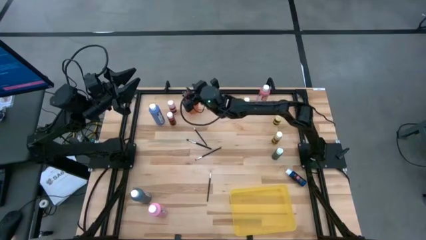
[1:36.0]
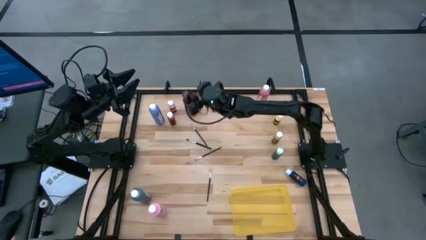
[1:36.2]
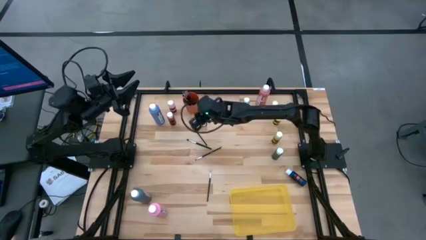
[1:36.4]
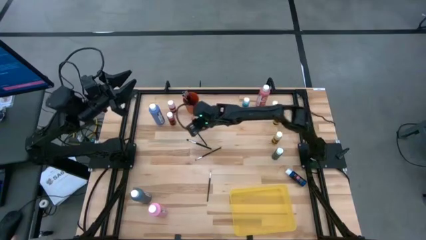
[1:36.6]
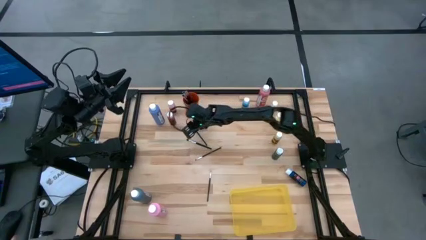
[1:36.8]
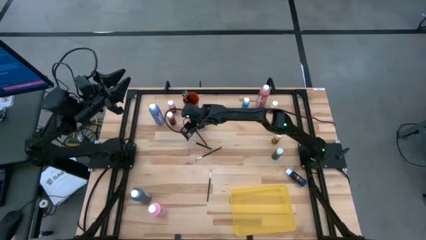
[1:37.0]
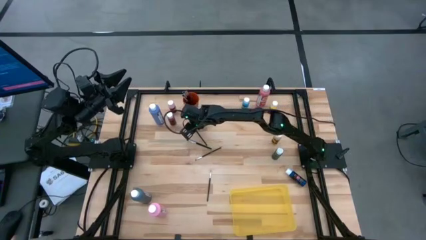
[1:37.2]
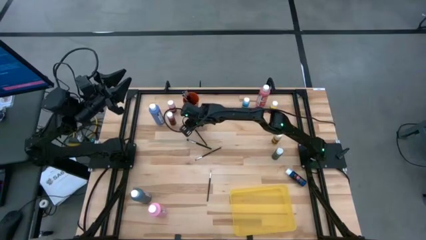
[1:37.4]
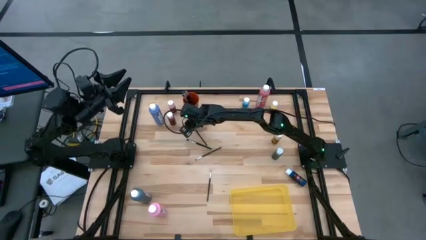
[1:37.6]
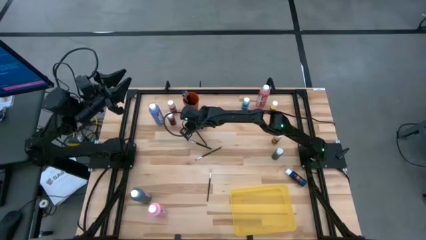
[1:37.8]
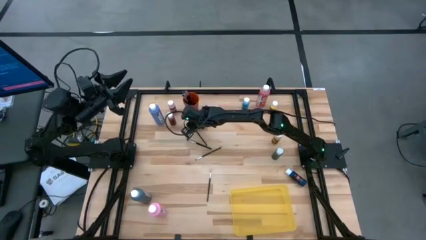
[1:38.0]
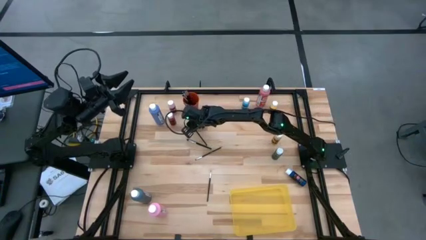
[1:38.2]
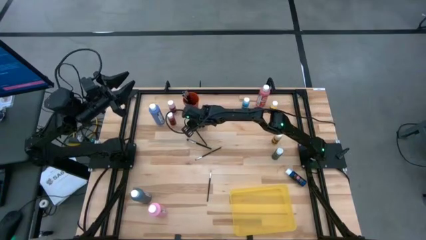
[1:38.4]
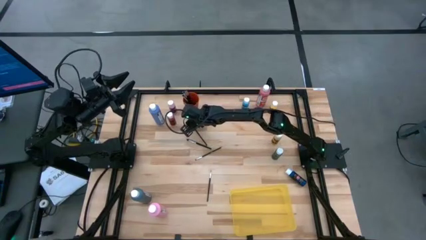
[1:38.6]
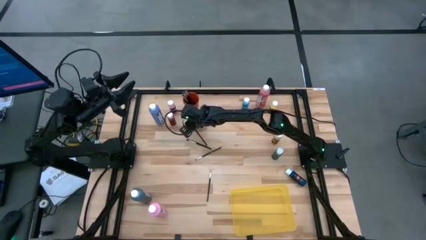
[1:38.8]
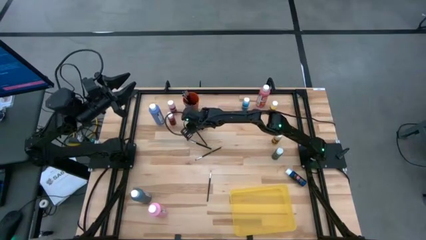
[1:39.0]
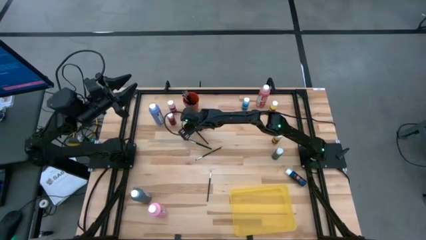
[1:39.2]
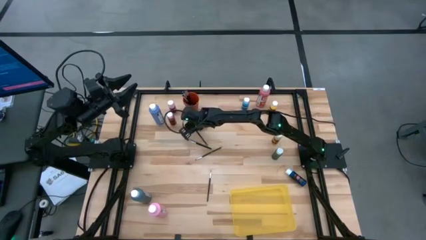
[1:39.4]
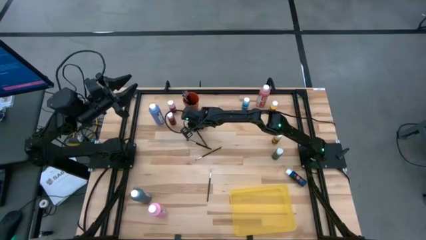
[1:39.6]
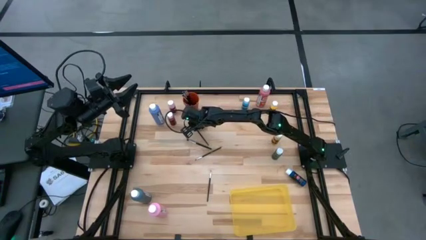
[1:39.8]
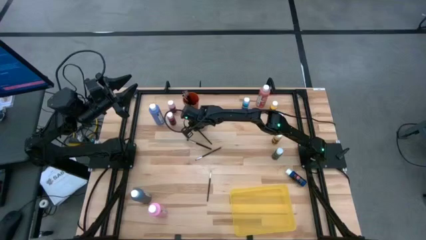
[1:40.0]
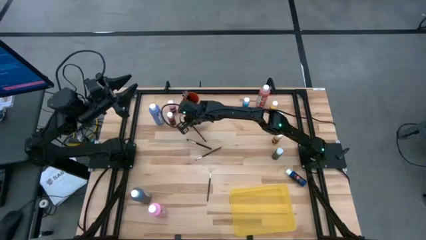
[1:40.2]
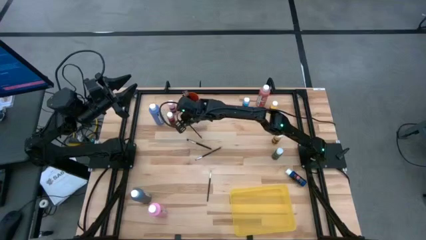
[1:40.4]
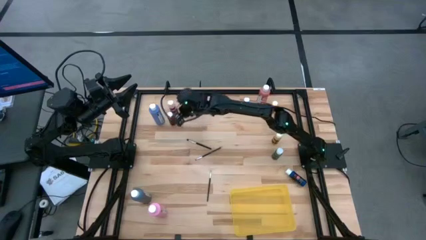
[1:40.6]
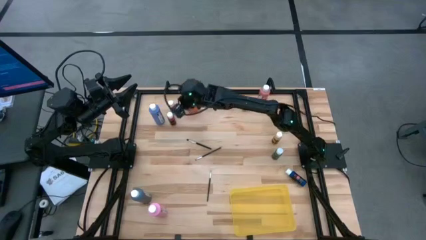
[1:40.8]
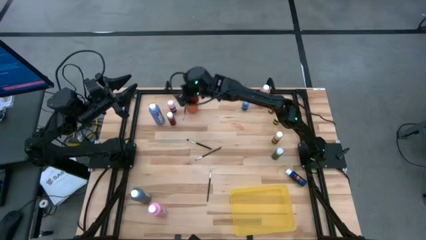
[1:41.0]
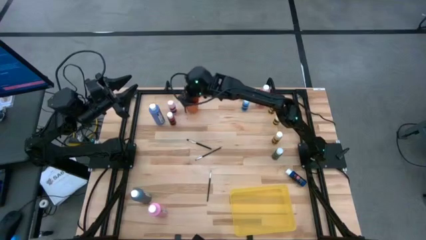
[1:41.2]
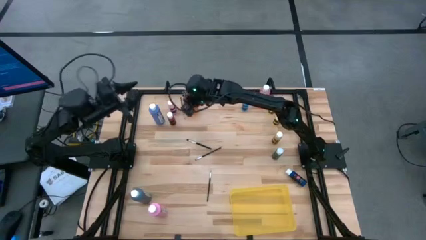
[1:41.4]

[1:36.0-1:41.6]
Task: Pick & Place Paint Supplies
Put the black paint brush into the orange cup

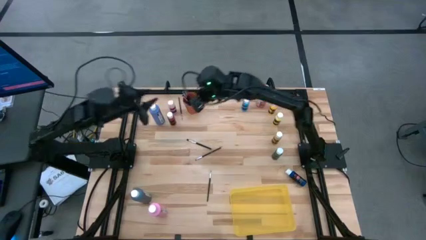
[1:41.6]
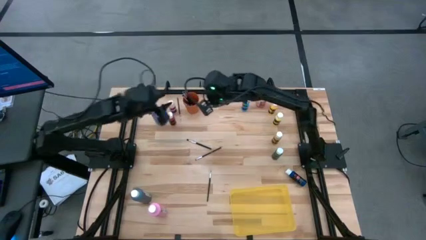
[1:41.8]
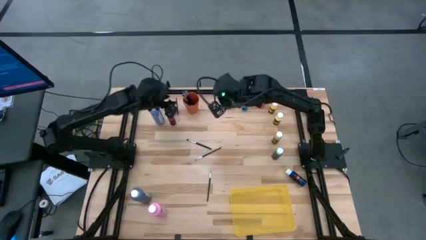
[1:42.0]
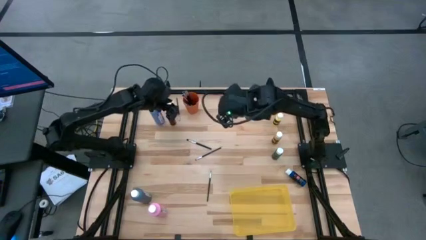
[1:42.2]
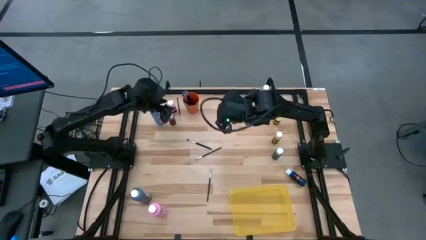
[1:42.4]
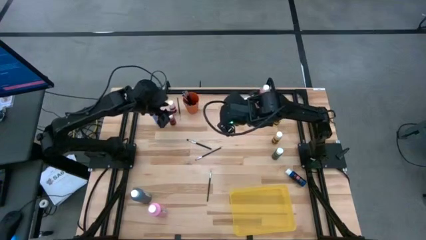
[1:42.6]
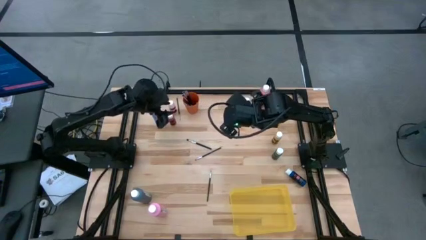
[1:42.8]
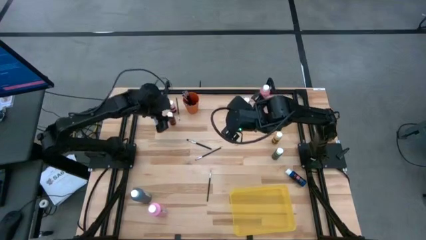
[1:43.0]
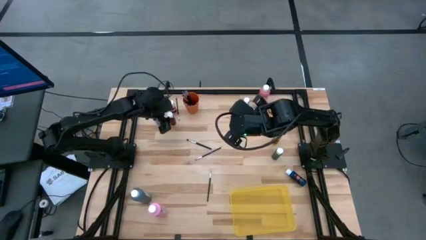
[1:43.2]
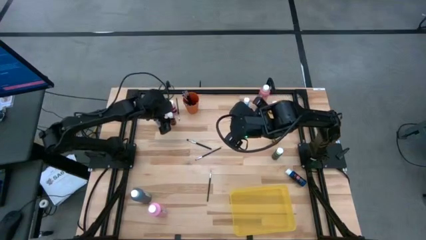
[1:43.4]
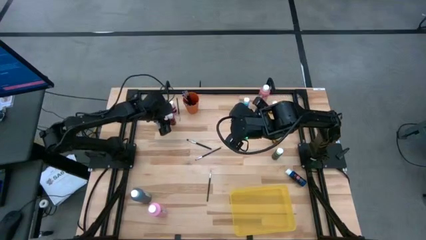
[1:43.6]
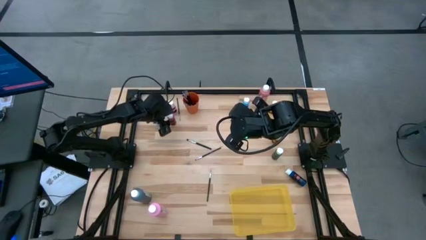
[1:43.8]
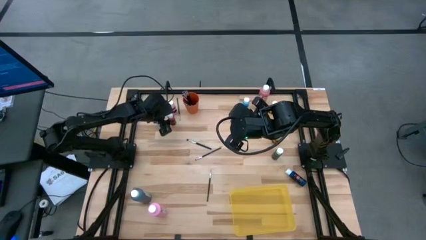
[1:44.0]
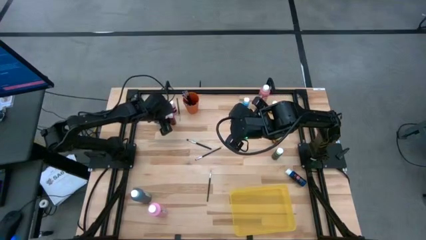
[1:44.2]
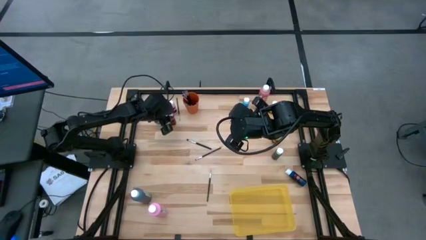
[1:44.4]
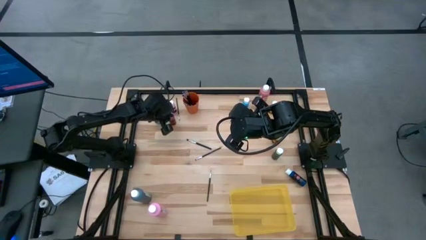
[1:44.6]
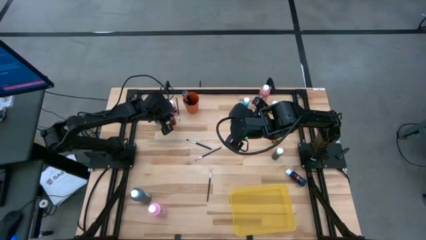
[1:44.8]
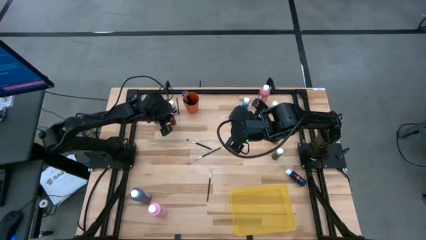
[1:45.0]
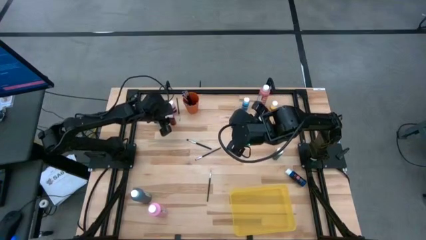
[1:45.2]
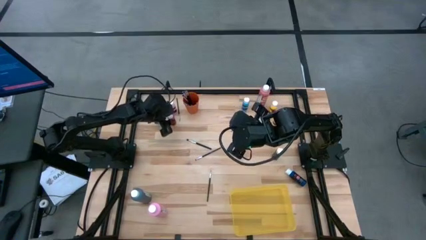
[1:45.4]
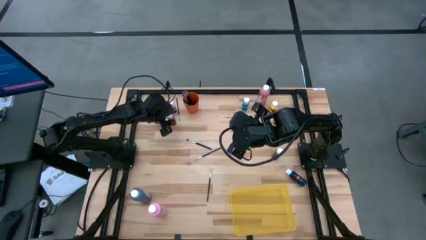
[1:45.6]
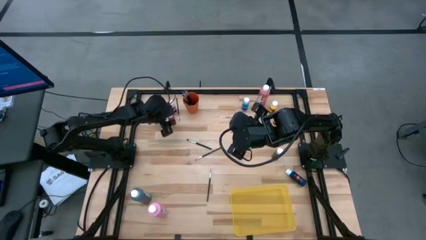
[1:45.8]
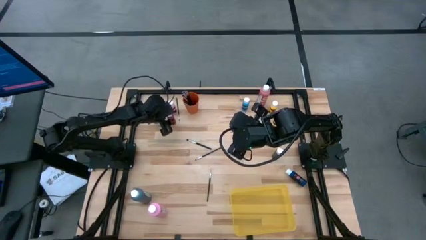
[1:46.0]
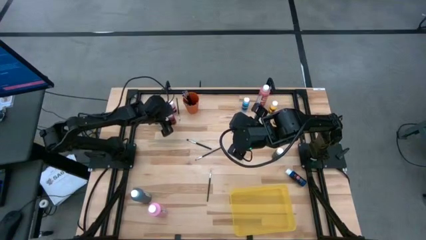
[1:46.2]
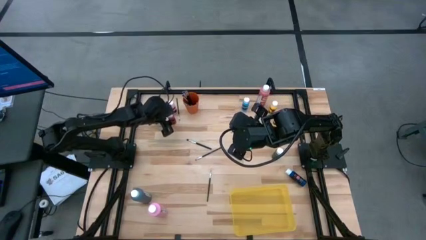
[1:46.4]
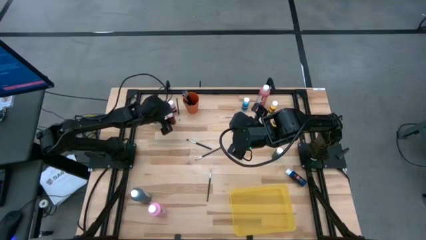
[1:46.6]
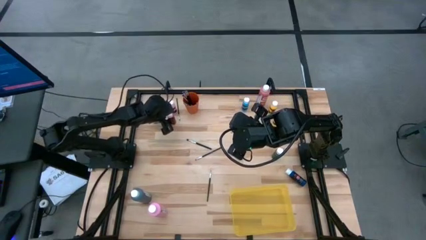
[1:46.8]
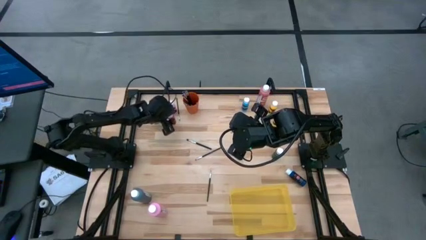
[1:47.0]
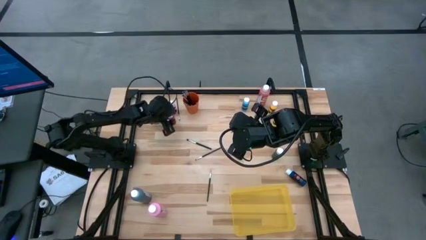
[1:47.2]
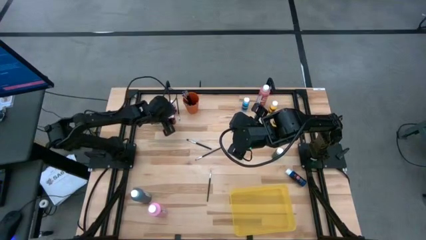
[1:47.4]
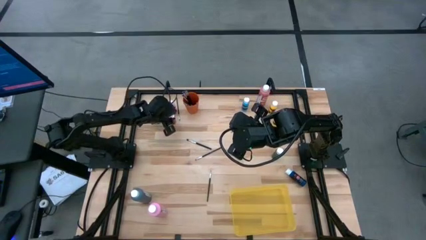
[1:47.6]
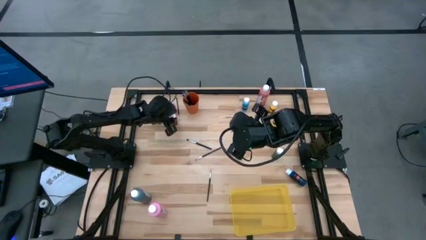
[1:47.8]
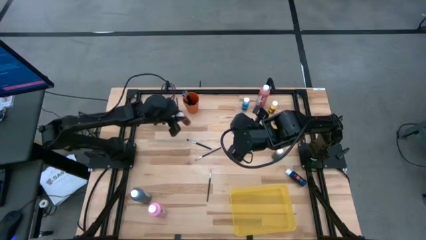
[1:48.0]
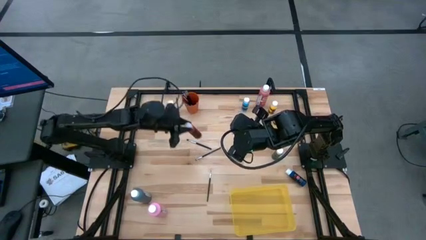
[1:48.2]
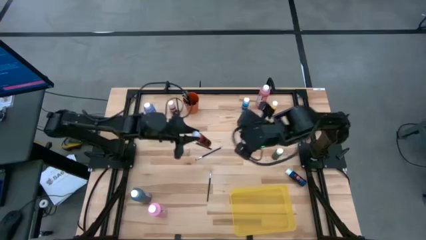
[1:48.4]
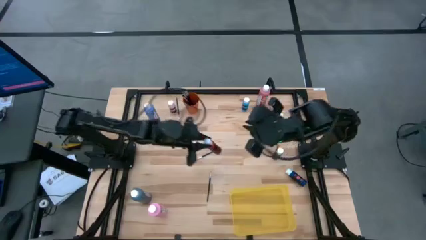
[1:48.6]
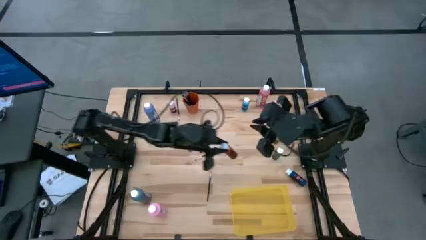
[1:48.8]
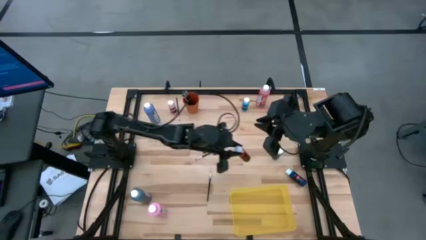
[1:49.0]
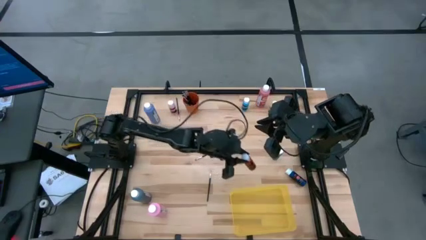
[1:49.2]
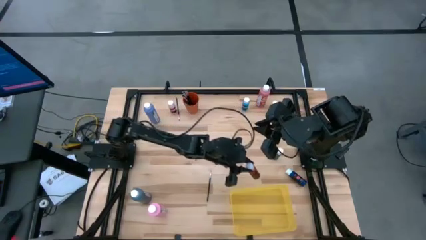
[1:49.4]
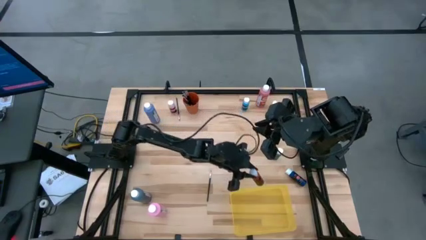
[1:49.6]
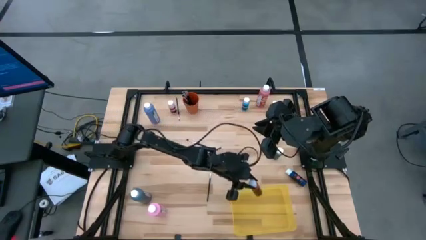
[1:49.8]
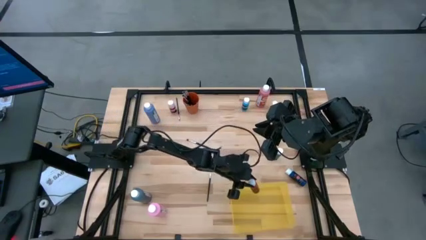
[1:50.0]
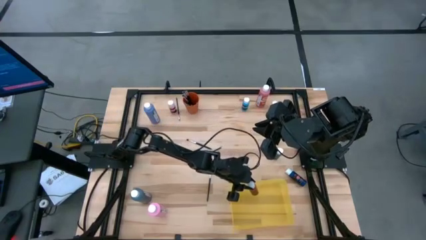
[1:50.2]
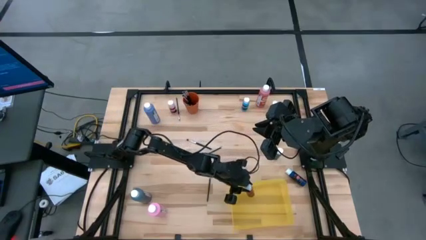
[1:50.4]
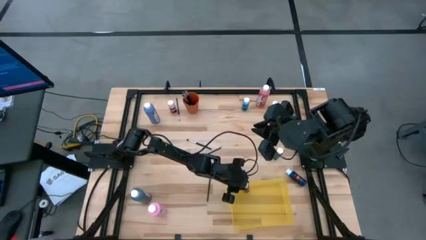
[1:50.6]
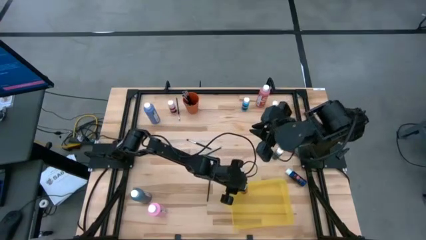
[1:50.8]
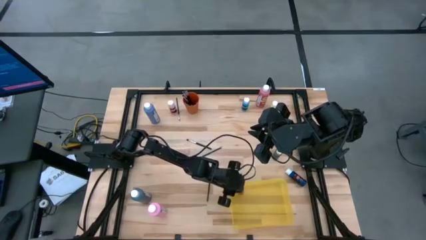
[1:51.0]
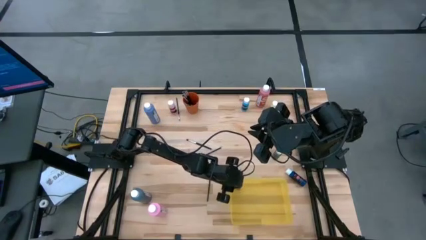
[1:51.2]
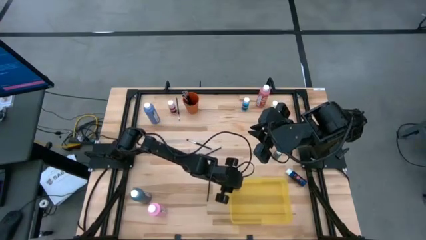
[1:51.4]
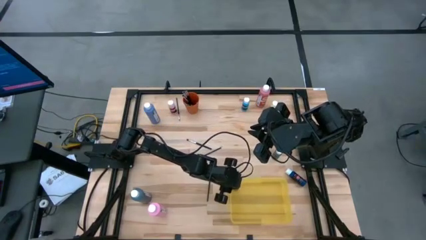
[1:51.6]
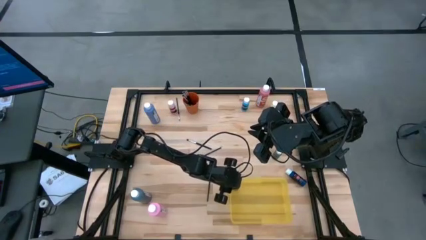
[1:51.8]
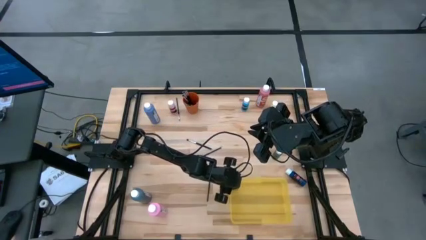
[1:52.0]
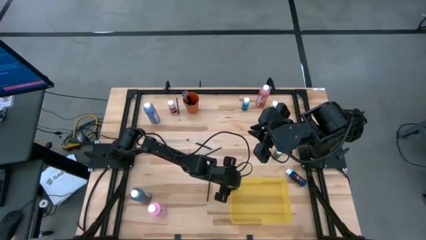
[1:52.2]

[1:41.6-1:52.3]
Put the red paint bottle into the yellow bin
